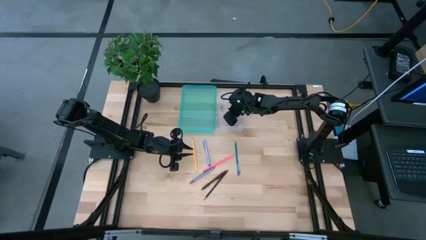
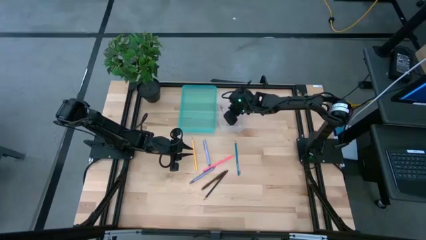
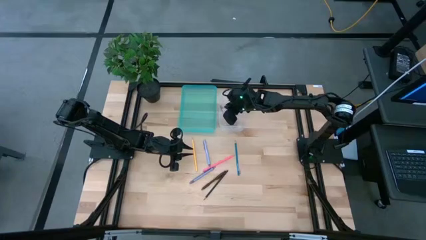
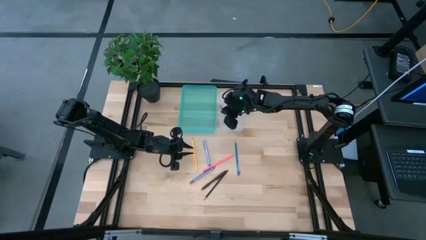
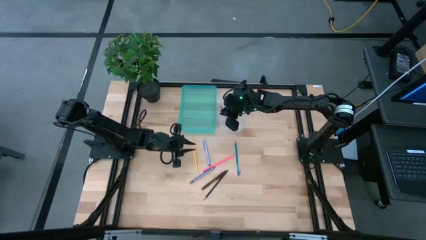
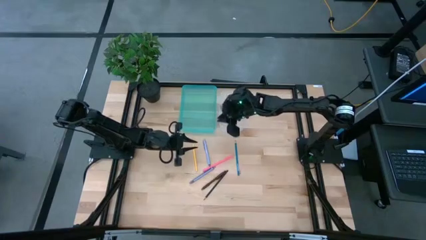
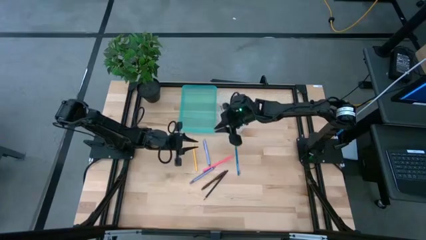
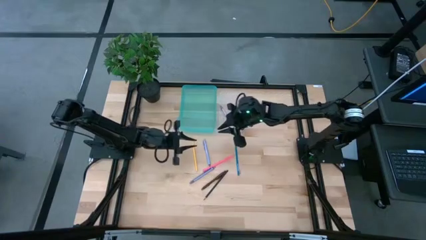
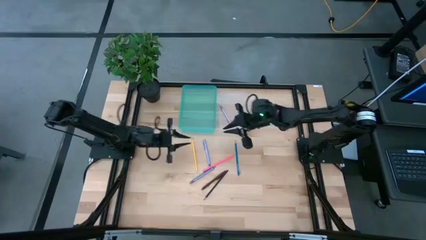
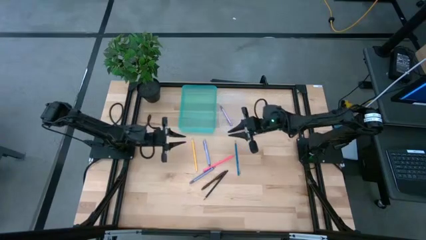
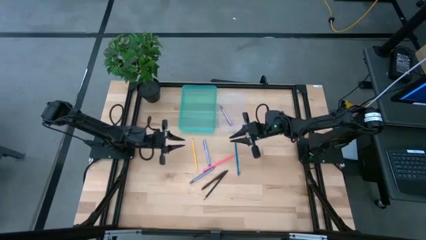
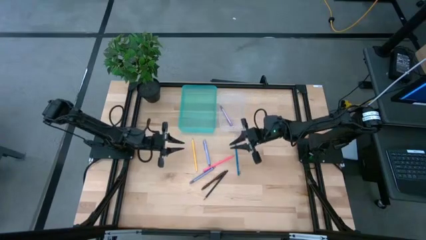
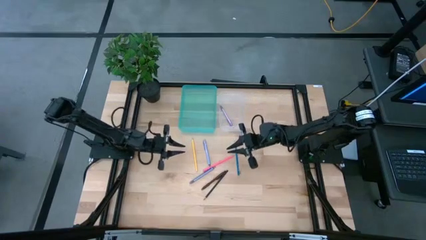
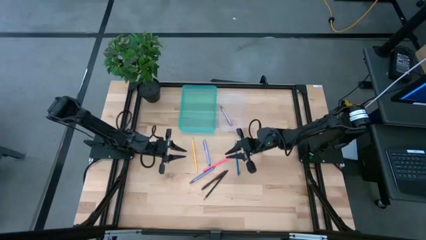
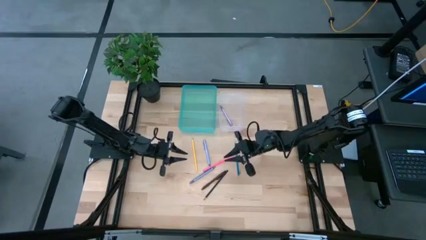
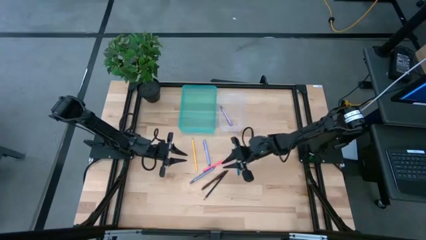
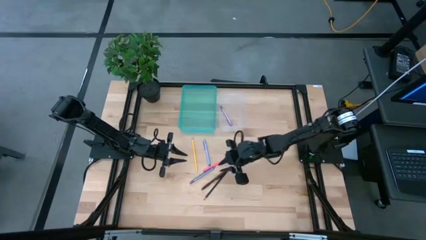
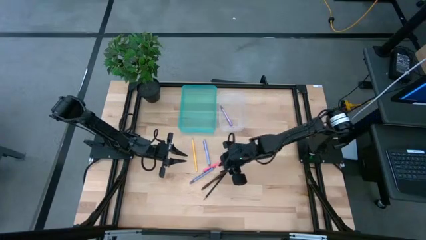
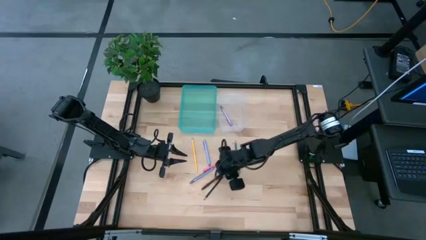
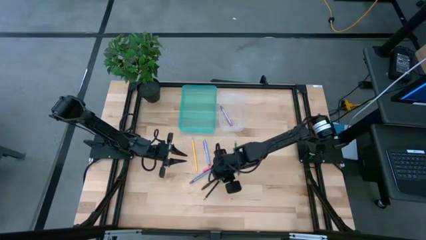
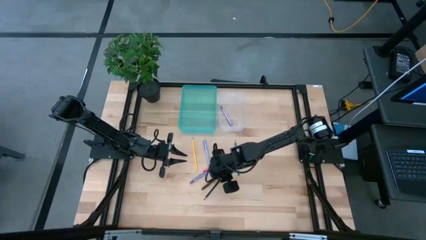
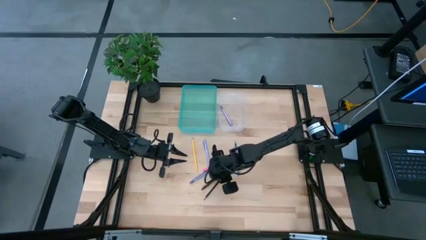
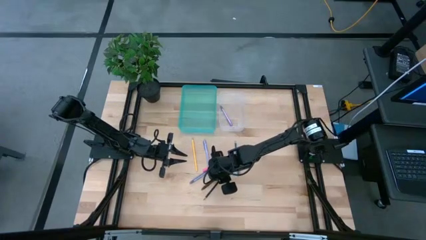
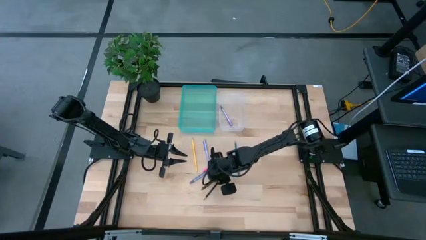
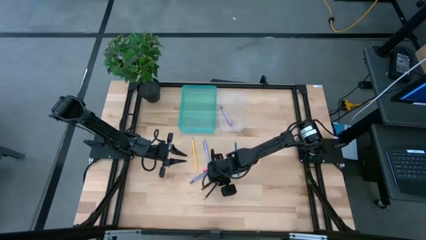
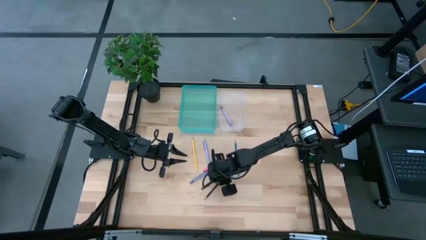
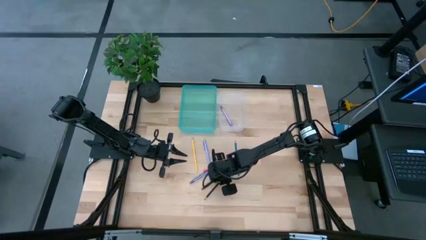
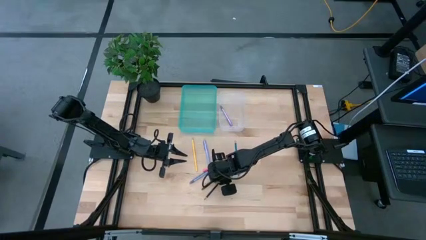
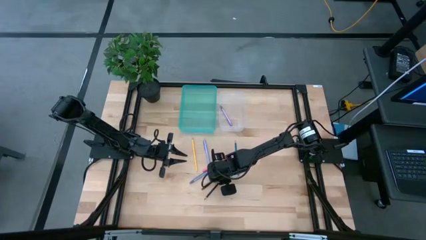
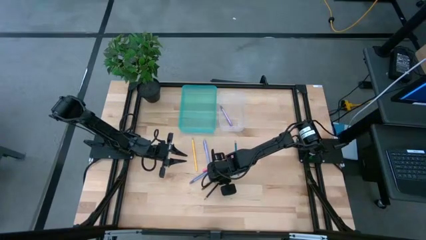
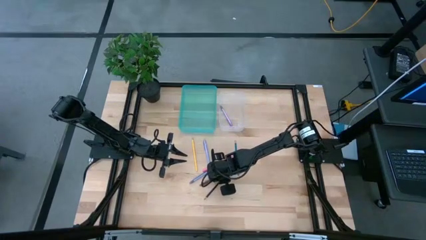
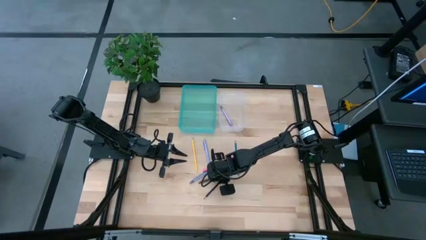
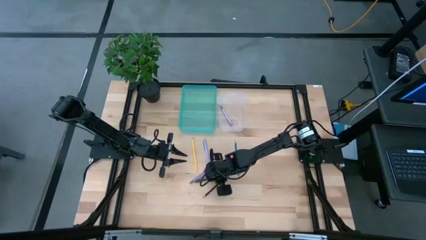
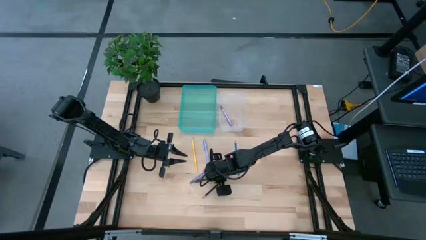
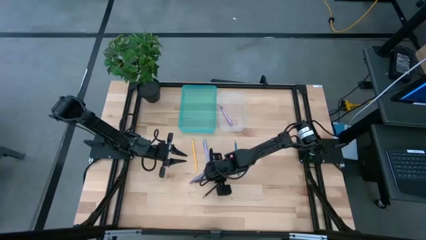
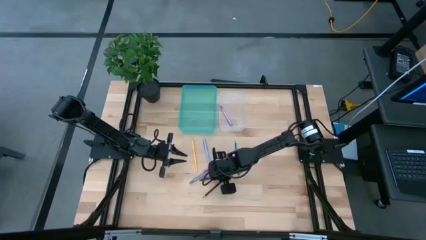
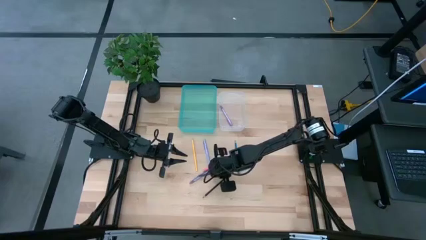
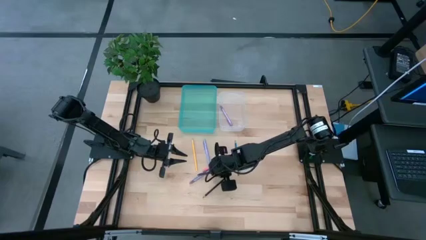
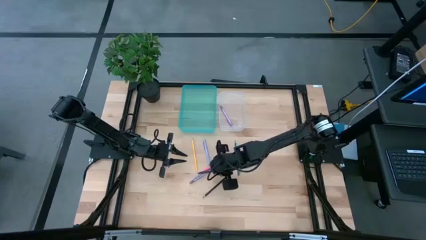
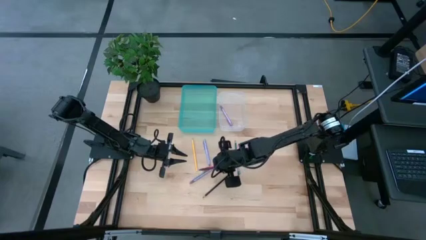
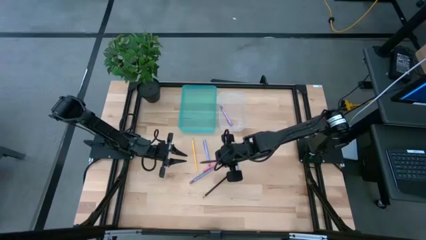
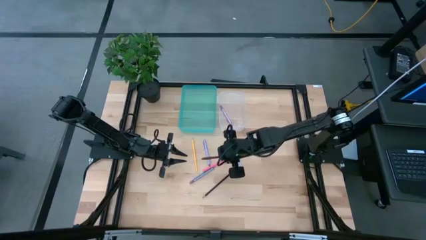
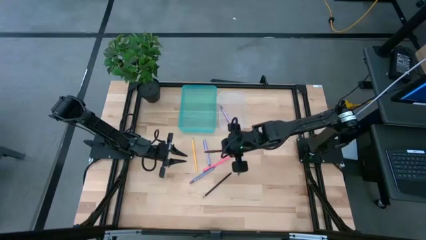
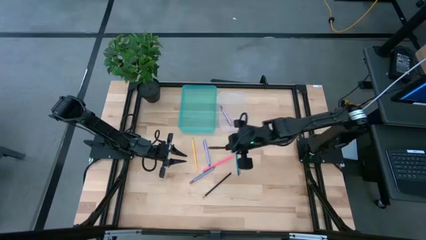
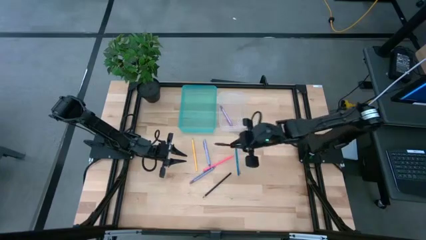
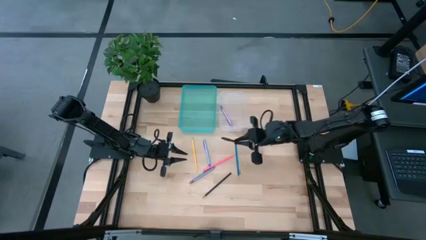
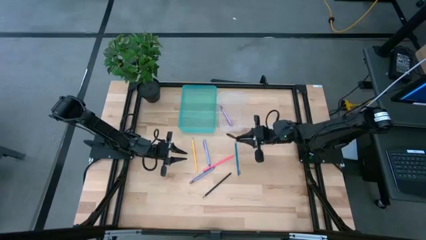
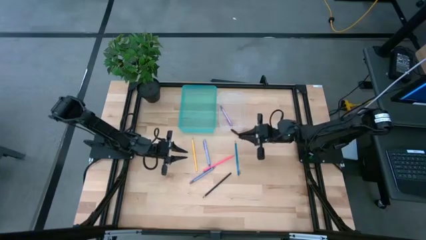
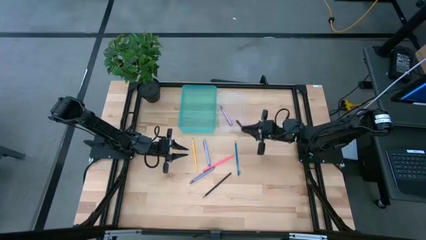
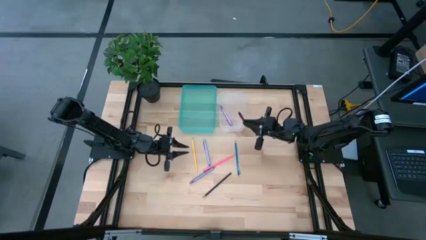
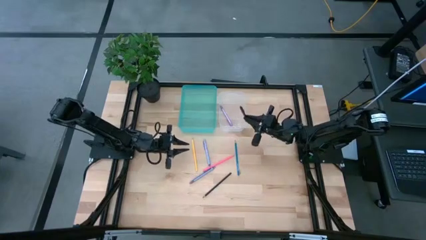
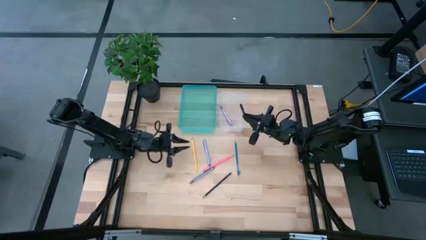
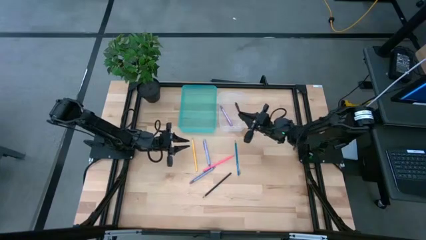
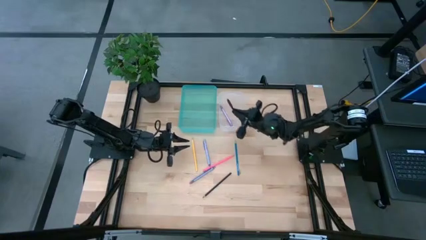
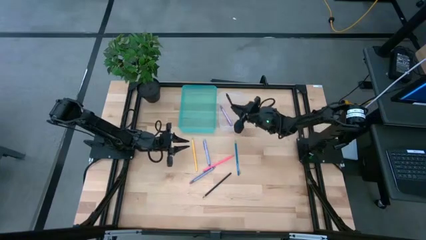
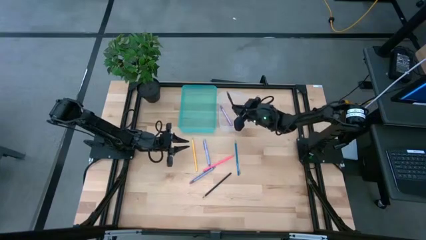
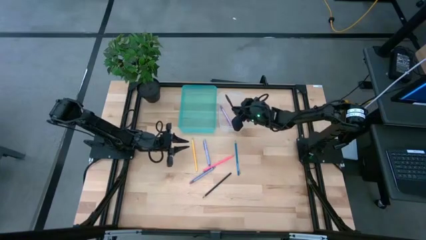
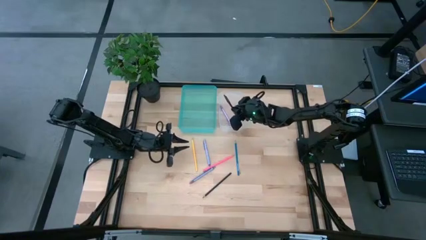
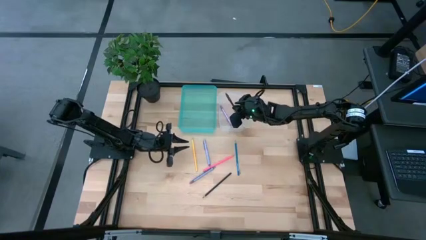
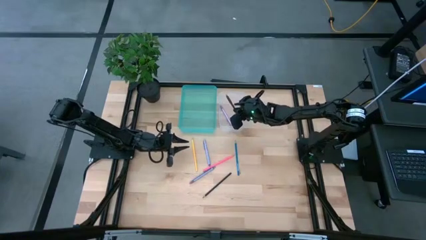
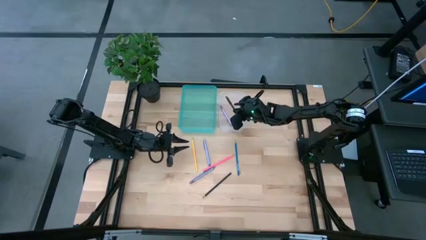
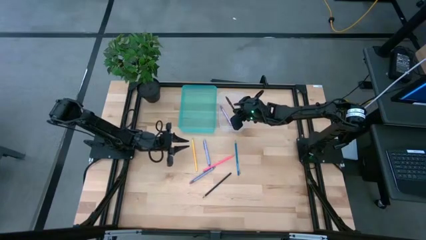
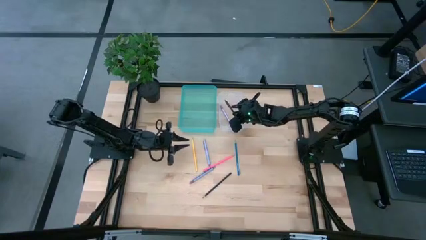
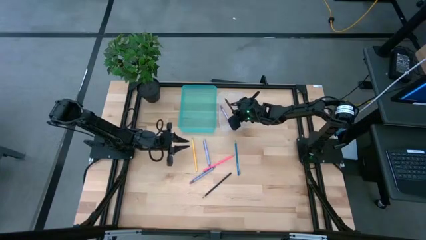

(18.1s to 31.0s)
Task: Sort pens & pencils
Put the brown pen into the transparent bin

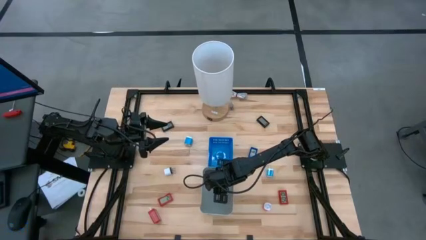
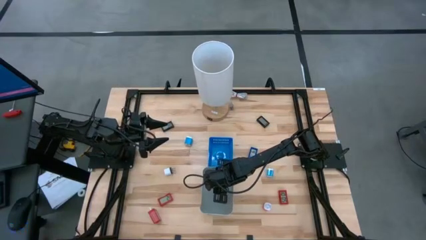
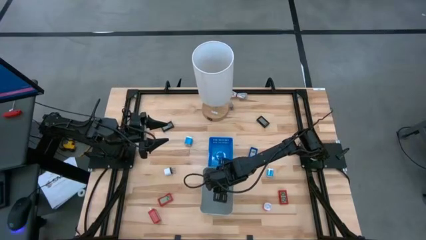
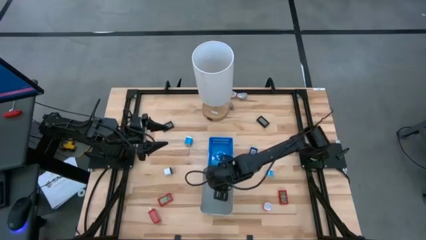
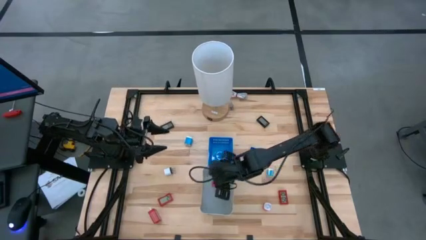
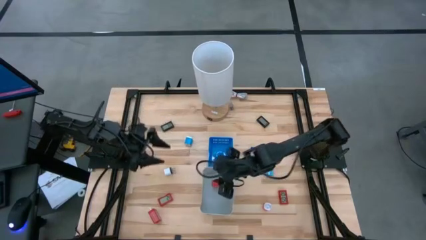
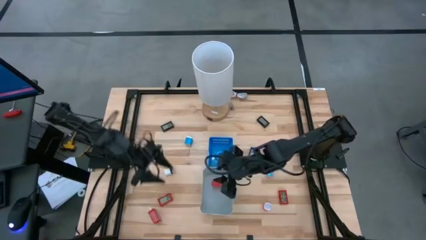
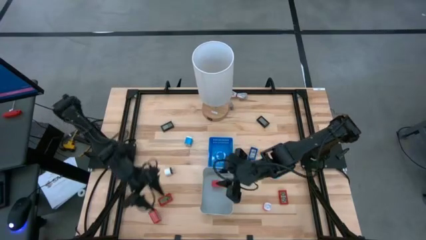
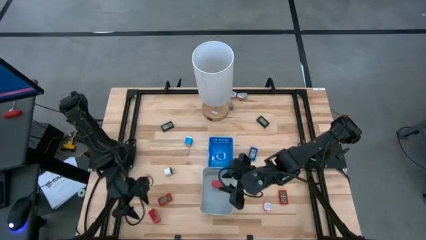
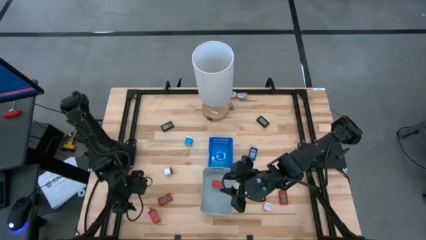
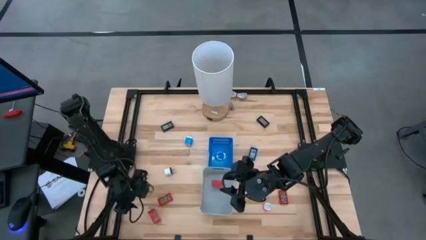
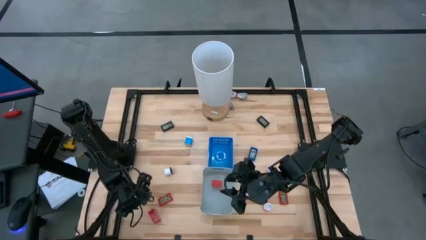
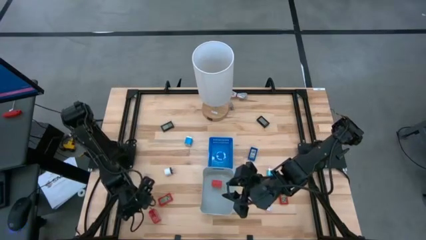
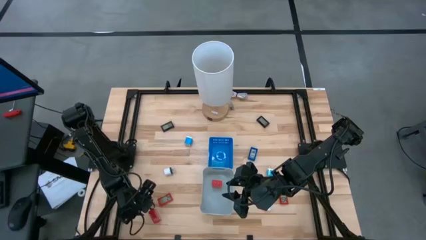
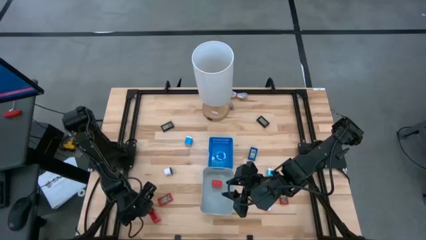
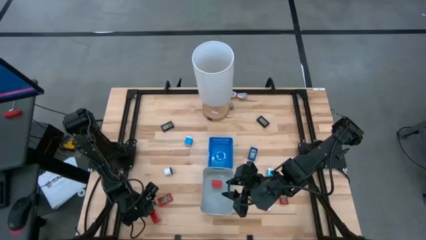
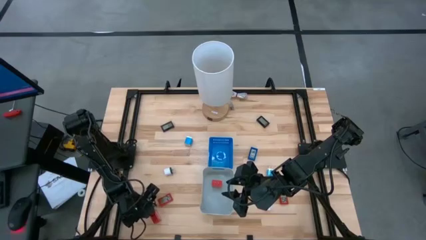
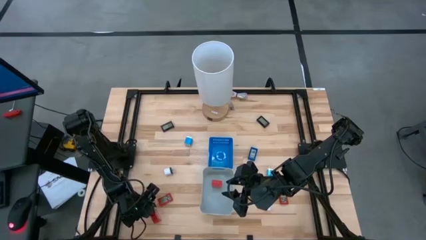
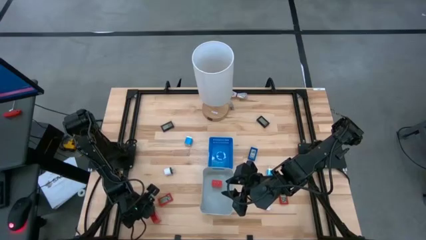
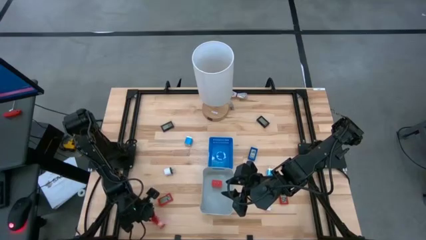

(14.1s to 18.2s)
Task: Pick & Place Office items
Put the red charger adapter into the gray bin
